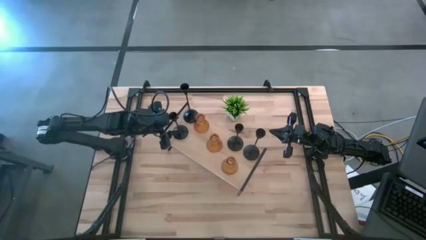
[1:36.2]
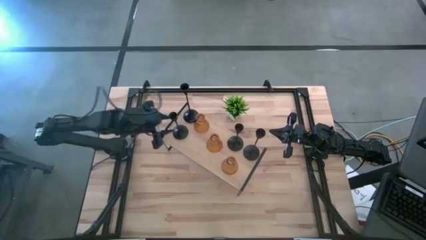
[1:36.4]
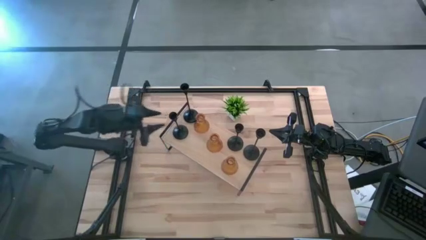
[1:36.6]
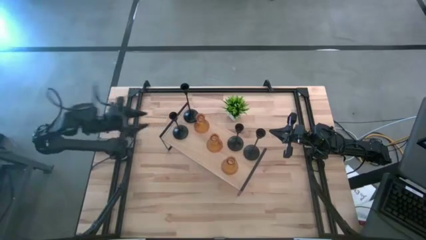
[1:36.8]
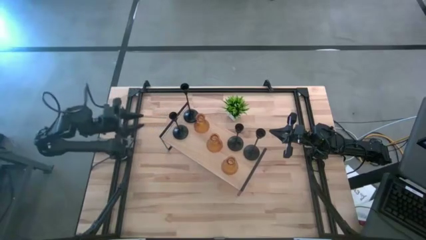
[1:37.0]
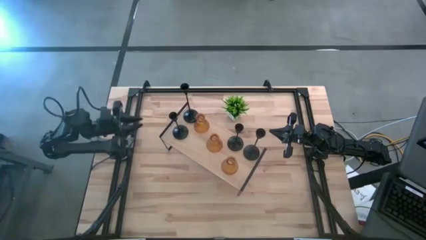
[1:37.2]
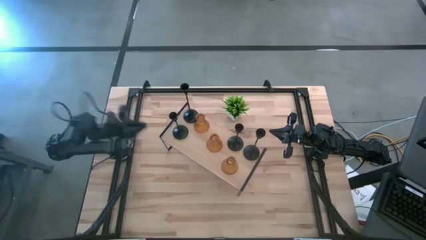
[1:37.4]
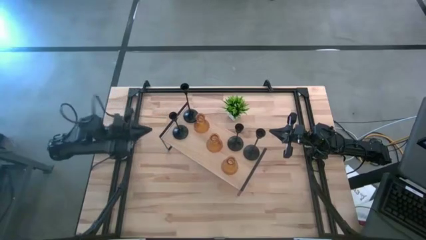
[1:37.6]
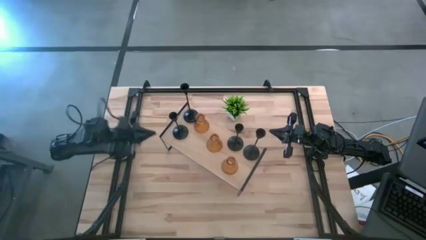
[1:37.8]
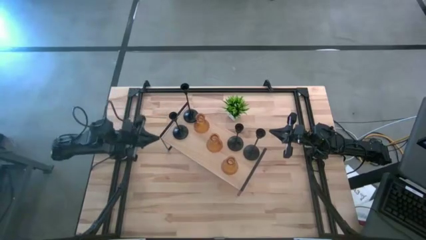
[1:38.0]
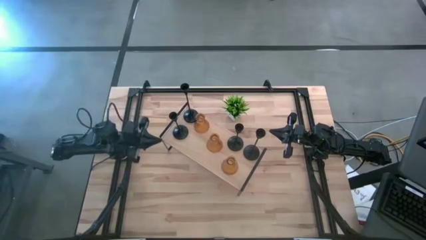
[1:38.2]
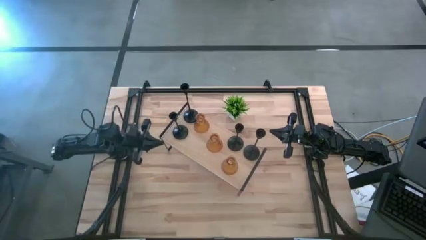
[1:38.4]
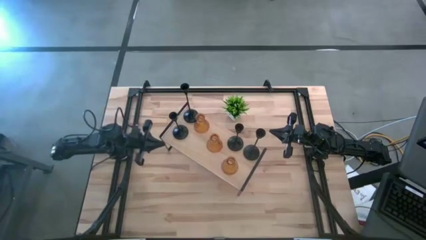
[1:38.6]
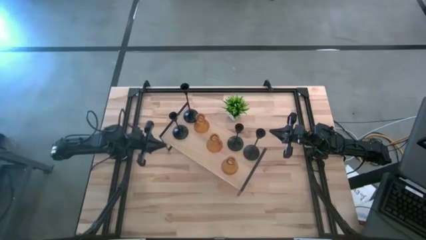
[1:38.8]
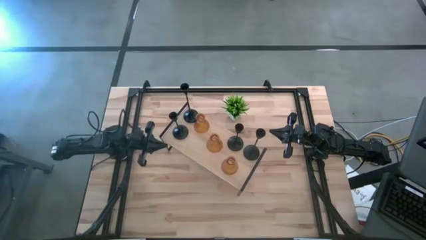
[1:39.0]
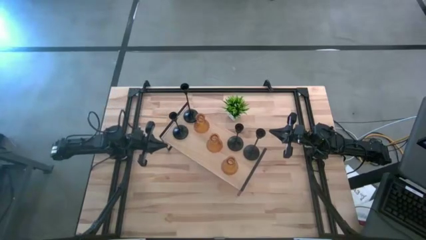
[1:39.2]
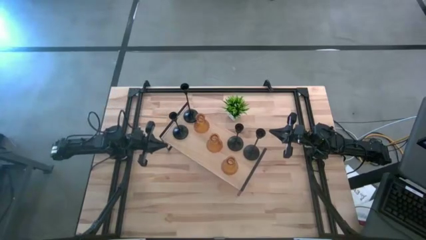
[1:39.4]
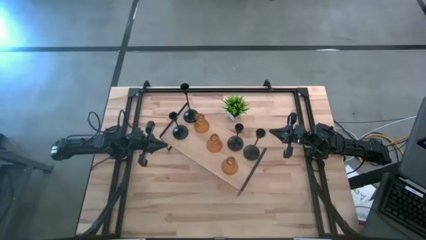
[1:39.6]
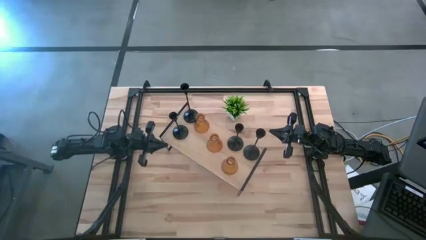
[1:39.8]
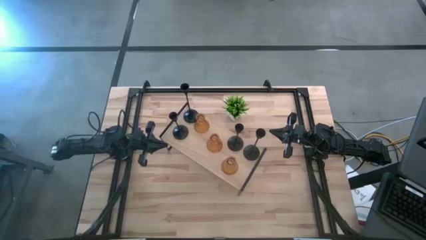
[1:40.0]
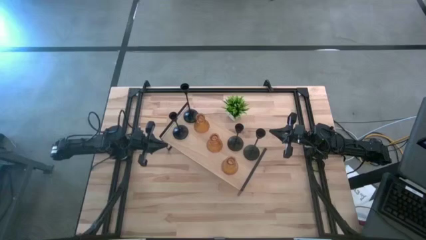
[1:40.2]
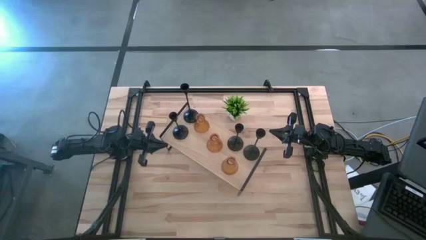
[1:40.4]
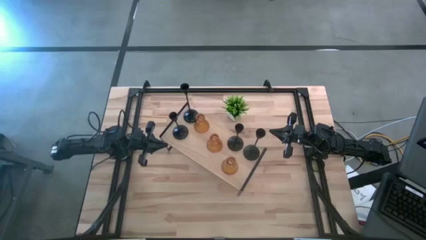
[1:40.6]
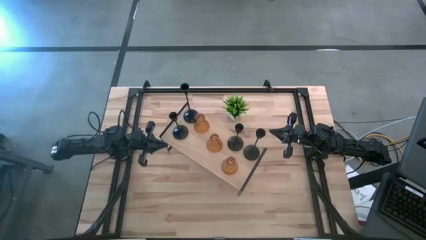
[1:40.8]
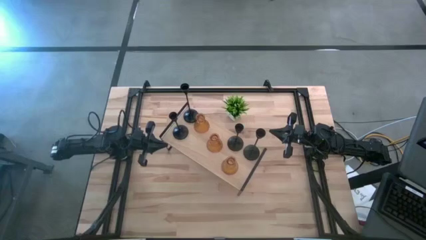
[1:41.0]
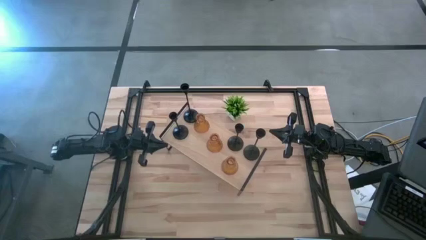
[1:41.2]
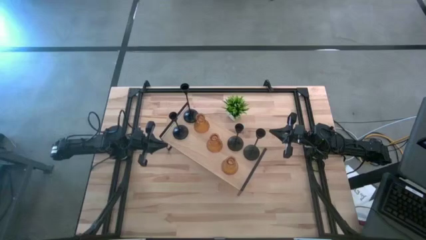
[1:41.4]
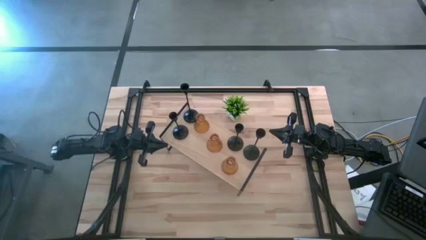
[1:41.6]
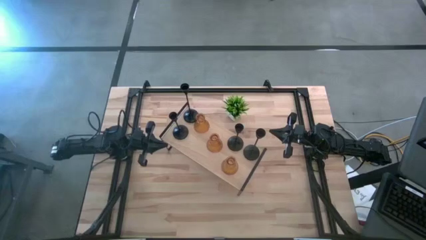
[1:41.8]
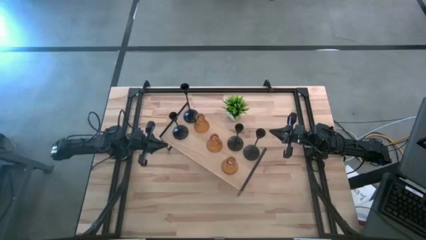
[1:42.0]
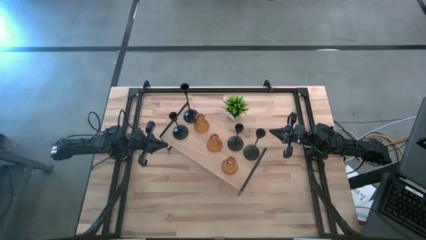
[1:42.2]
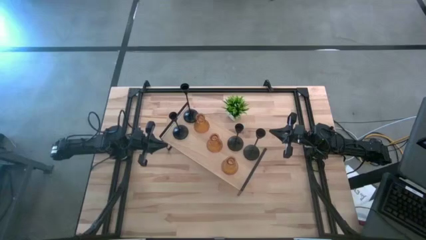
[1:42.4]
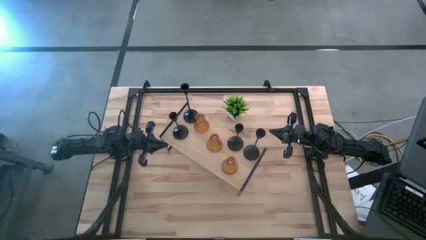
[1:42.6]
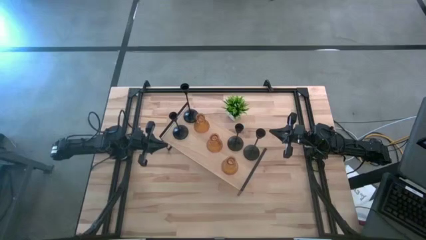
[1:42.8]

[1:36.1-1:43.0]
Task: Pick & Place candle stick holders
Return to Home Position
